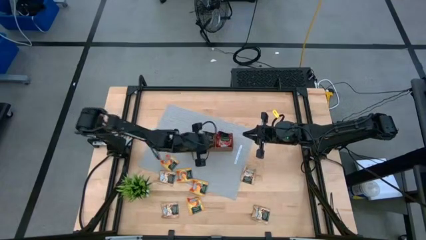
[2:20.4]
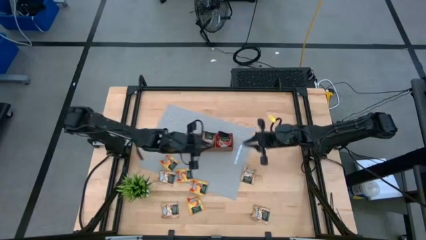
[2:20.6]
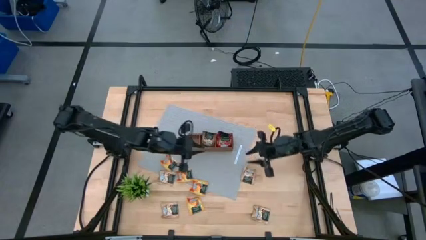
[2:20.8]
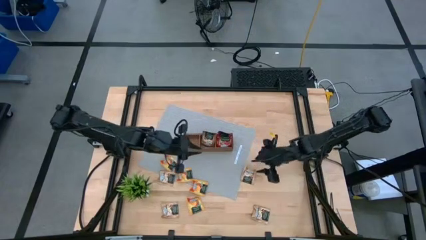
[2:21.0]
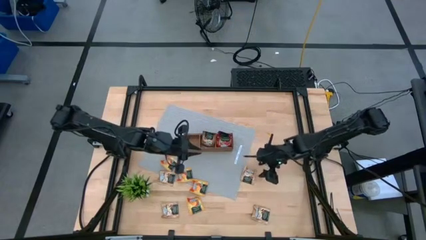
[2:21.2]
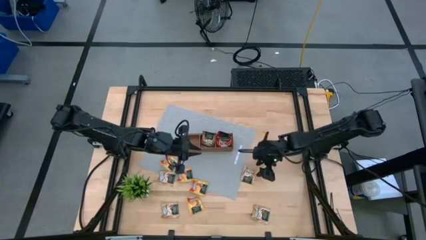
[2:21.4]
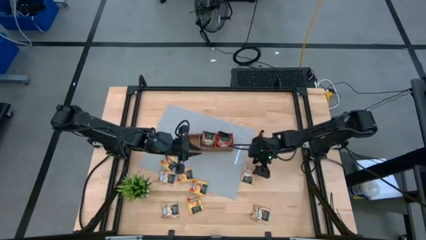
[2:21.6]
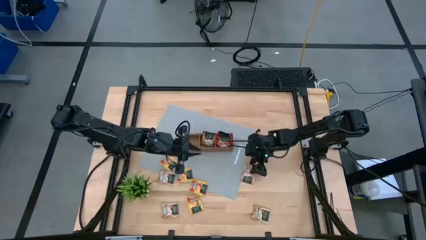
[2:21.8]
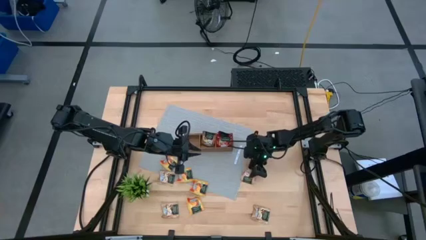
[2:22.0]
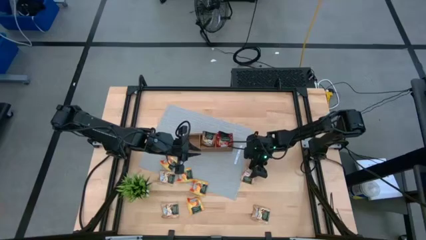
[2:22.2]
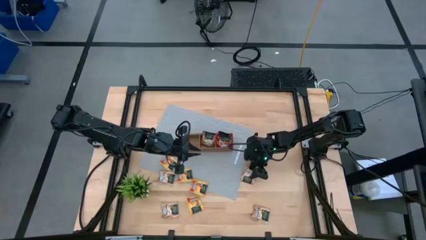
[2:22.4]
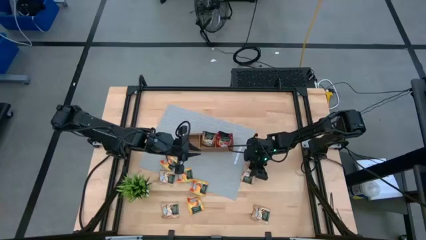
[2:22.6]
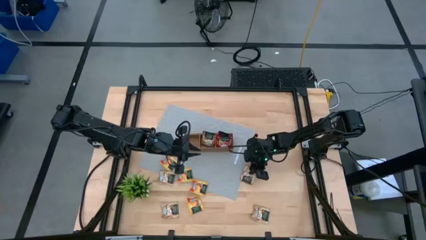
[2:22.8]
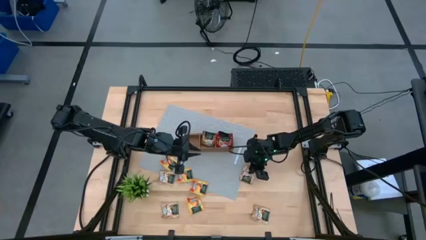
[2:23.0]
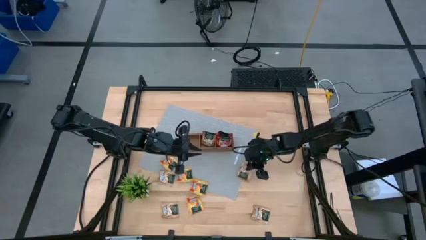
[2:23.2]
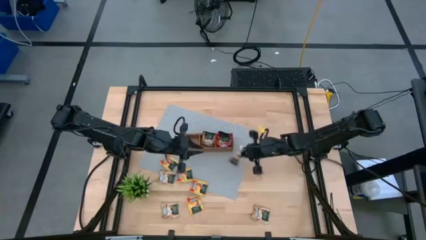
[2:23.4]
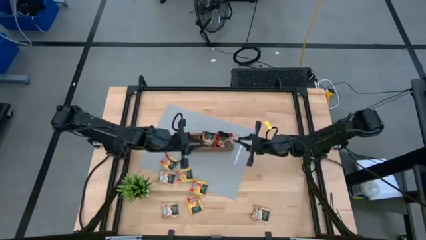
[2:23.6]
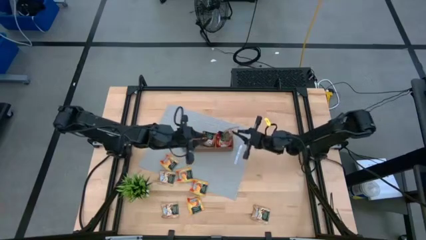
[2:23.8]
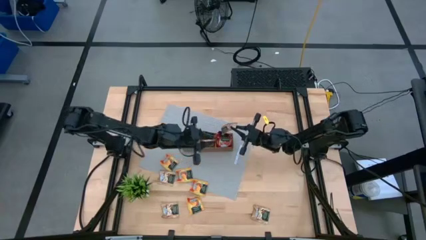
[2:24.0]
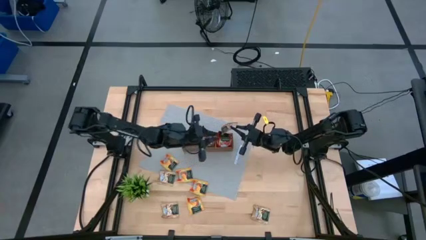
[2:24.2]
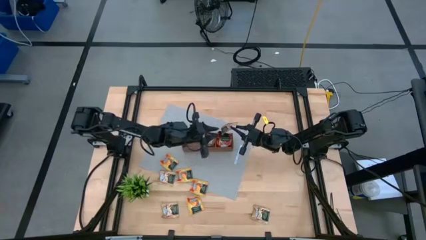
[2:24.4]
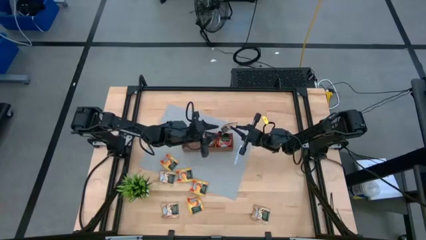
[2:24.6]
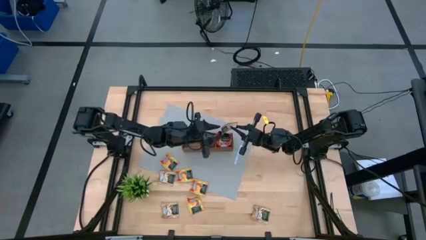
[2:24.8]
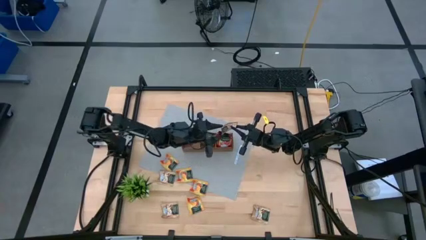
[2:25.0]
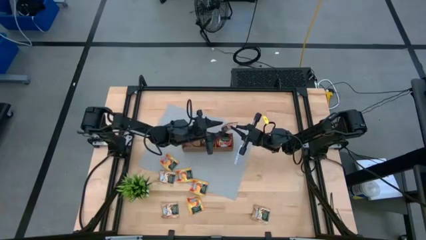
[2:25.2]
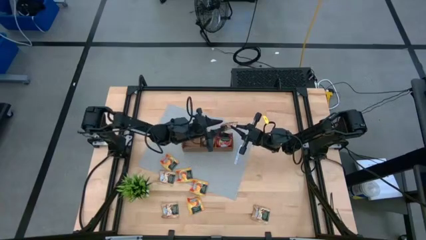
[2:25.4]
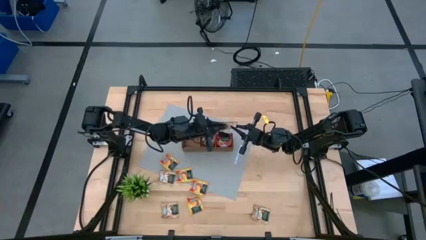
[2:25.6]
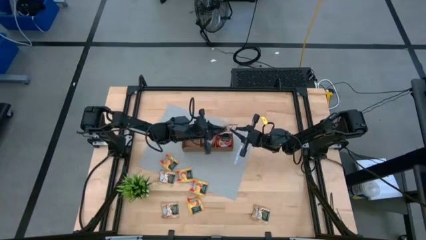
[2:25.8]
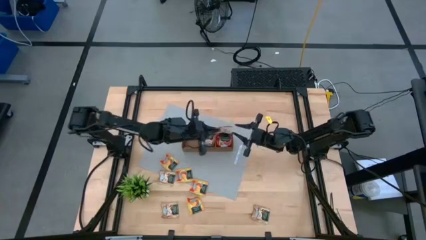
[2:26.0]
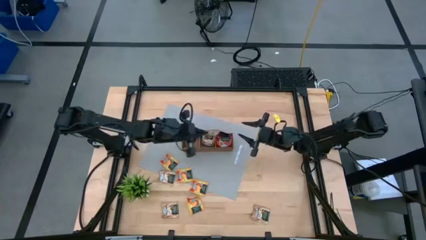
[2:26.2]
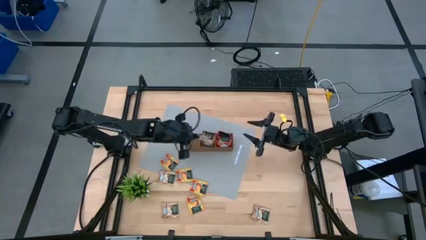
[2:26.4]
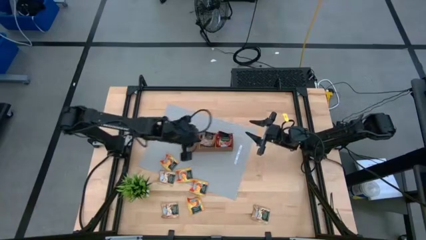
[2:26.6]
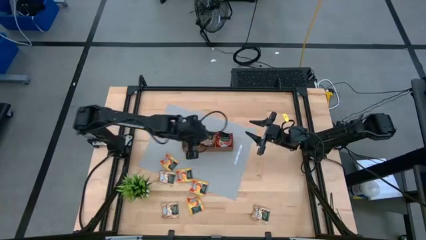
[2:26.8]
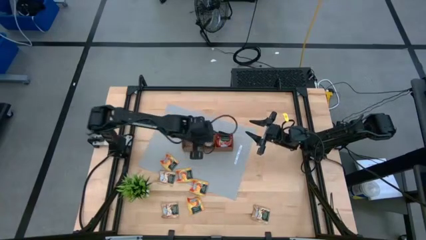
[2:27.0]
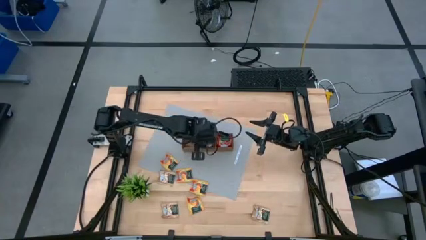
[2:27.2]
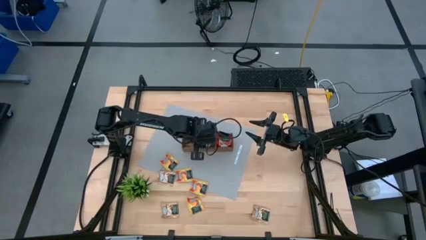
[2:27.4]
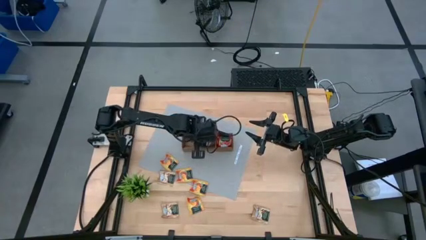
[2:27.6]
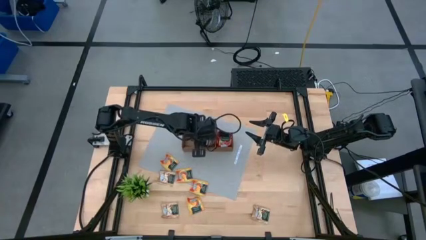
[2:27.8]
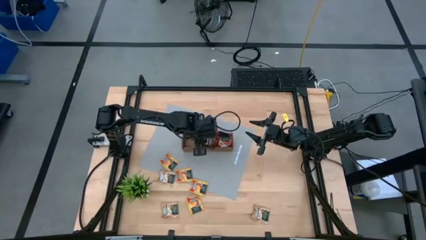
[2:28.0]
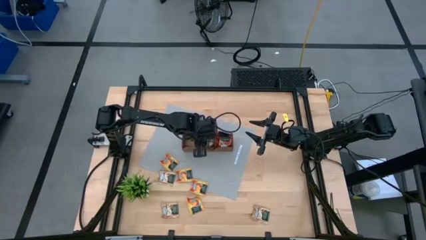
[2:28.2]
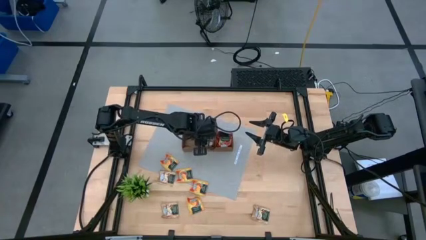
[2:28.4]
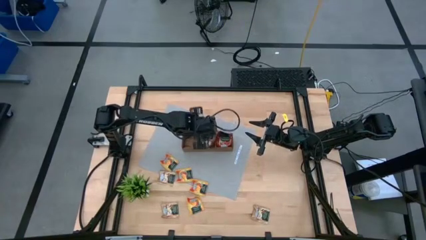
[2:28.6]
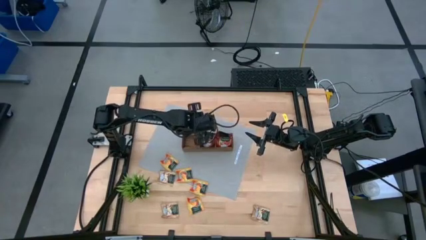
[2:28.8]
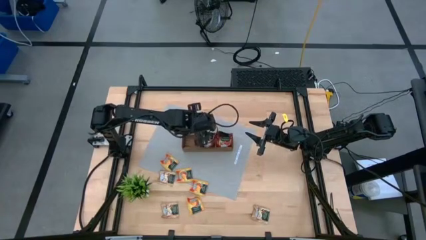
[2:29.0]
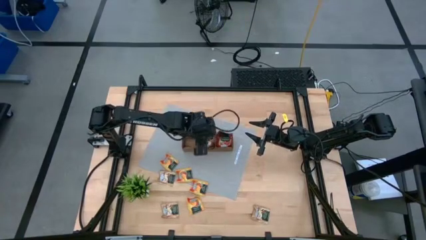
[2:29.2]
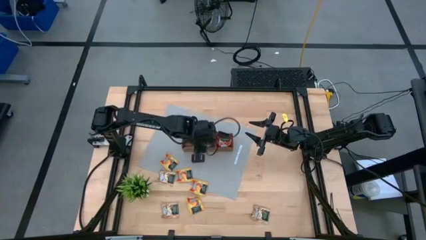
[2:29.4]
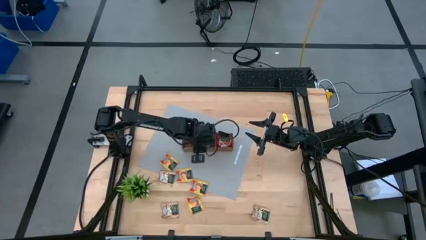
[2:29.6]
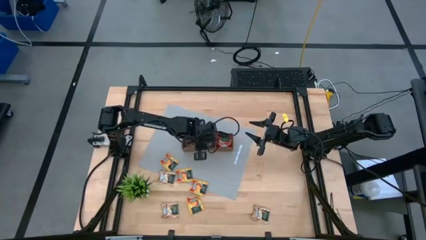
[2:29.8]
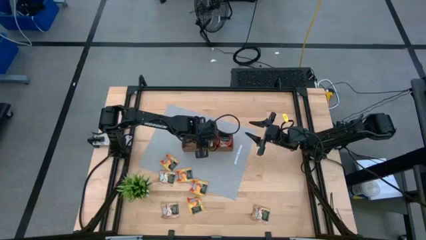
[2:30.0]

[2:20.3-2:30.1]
Task: Pick & Place Tea
Put the brown tea bag into the wooden organizer

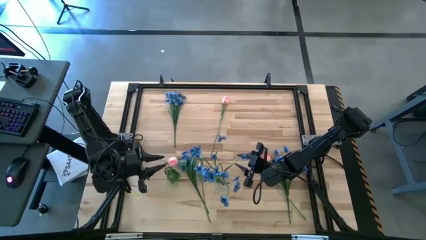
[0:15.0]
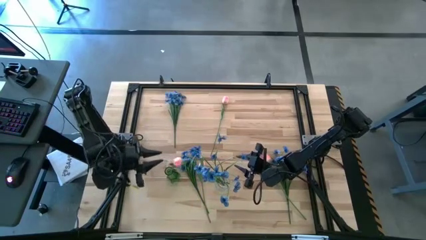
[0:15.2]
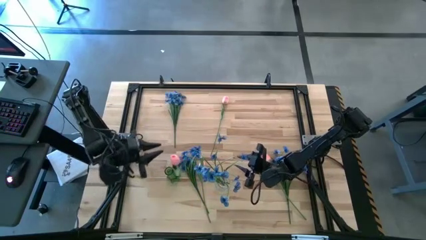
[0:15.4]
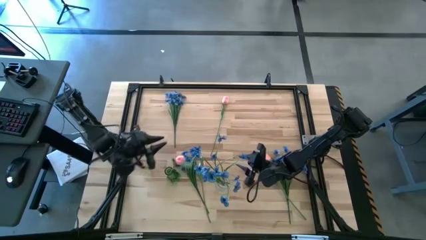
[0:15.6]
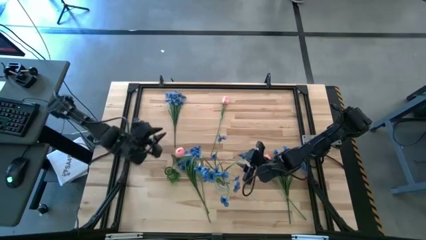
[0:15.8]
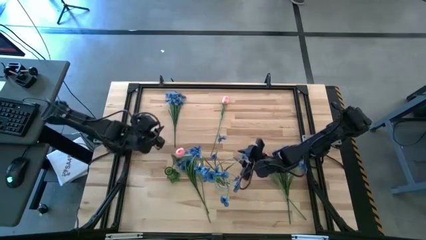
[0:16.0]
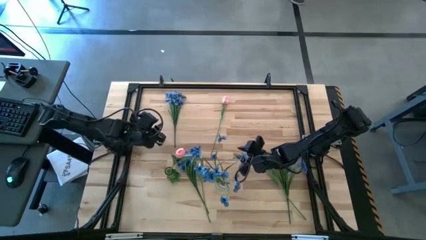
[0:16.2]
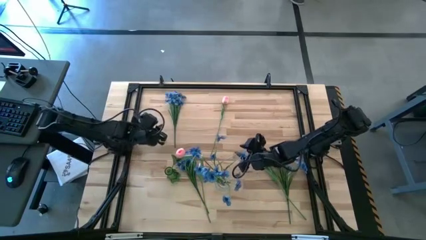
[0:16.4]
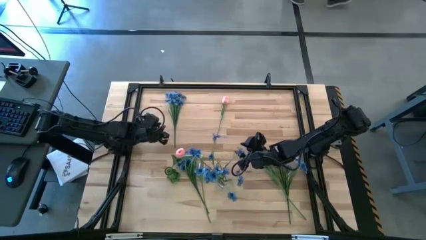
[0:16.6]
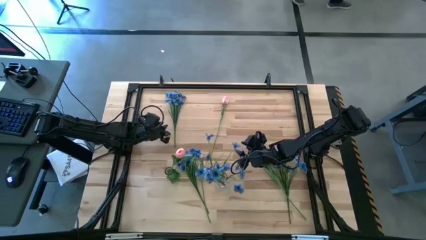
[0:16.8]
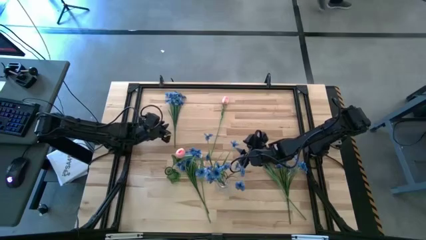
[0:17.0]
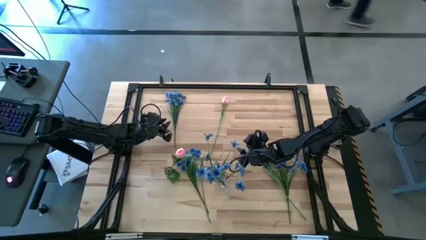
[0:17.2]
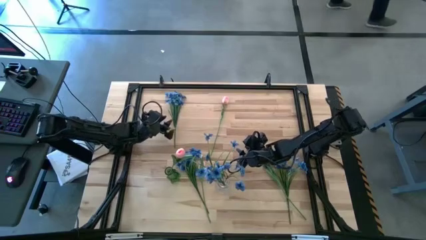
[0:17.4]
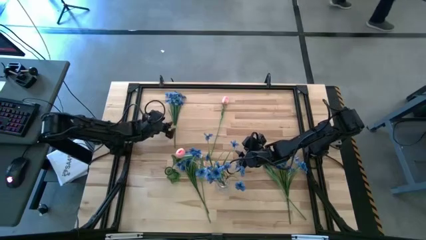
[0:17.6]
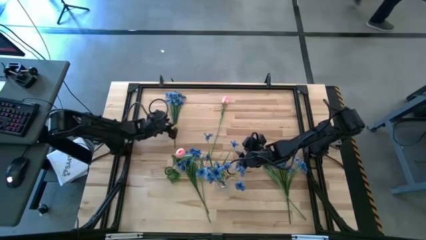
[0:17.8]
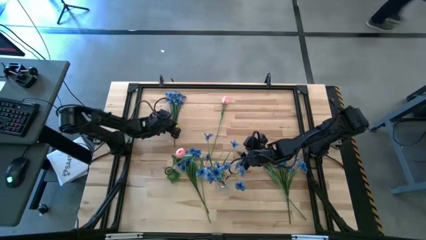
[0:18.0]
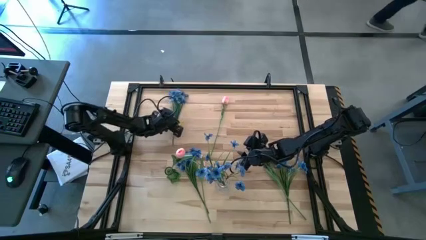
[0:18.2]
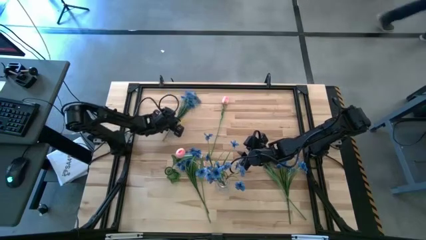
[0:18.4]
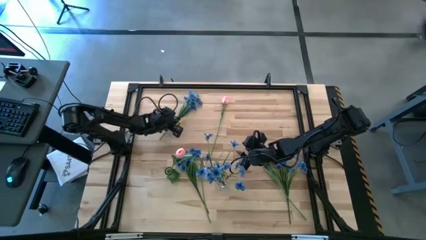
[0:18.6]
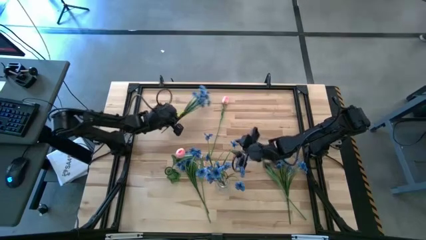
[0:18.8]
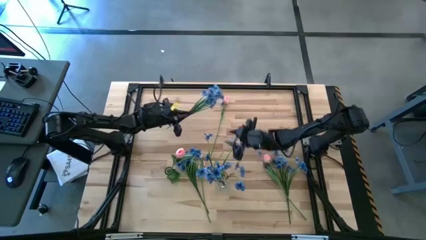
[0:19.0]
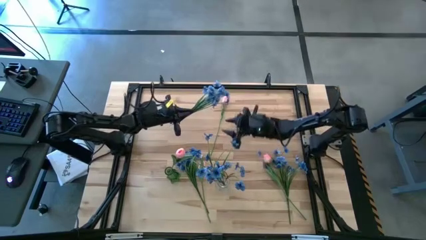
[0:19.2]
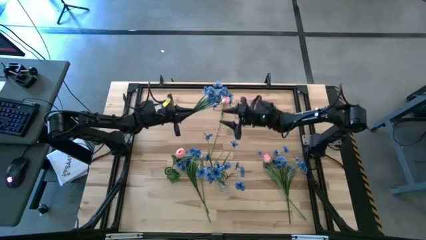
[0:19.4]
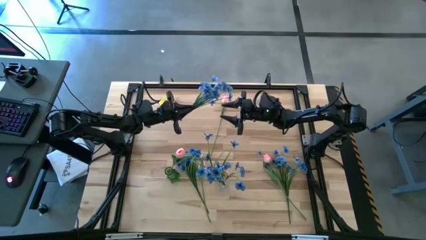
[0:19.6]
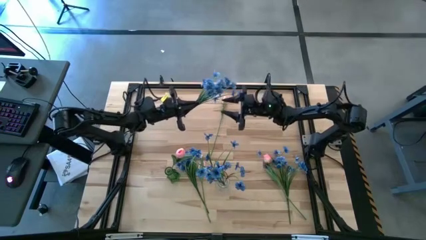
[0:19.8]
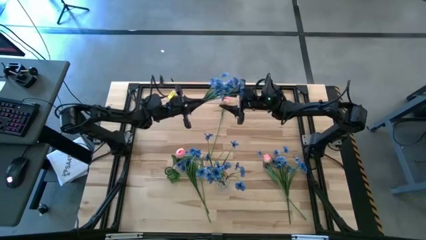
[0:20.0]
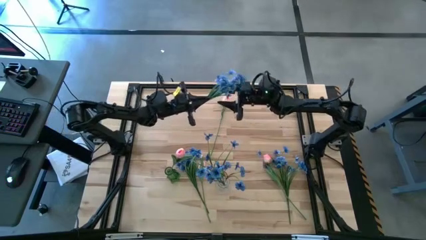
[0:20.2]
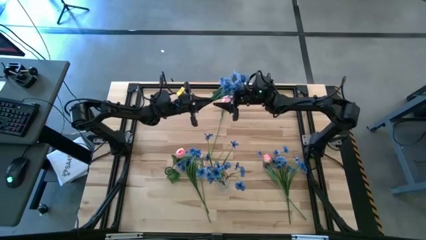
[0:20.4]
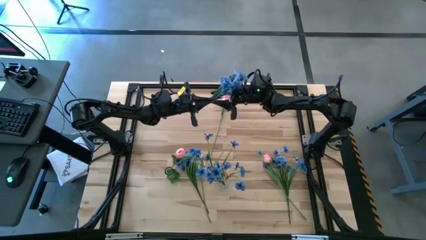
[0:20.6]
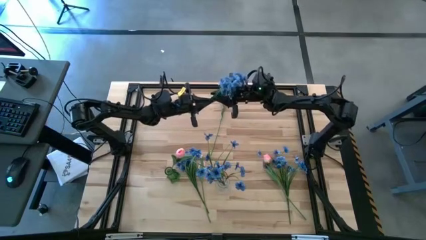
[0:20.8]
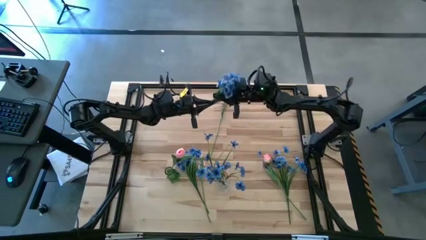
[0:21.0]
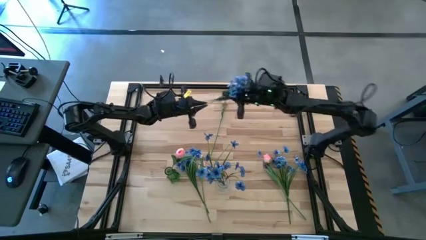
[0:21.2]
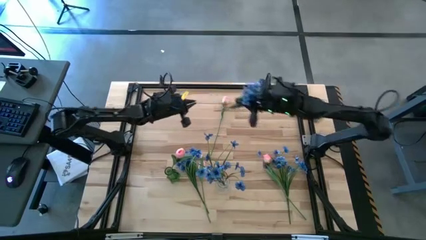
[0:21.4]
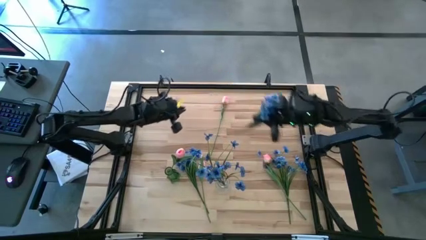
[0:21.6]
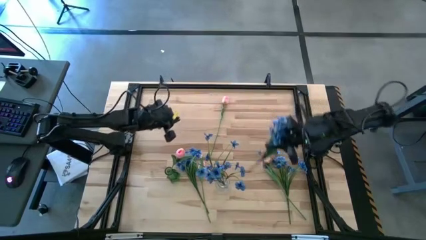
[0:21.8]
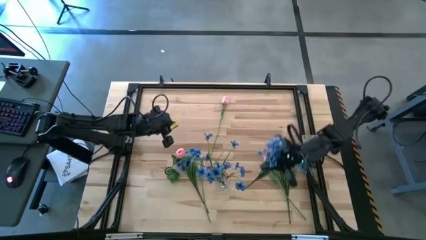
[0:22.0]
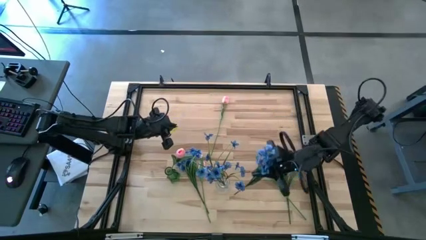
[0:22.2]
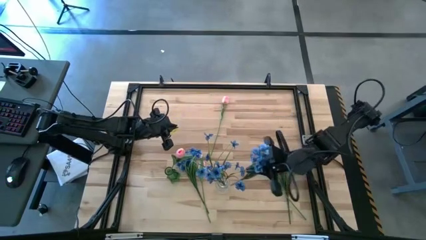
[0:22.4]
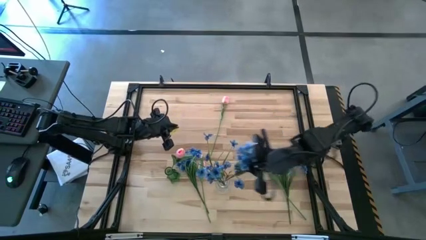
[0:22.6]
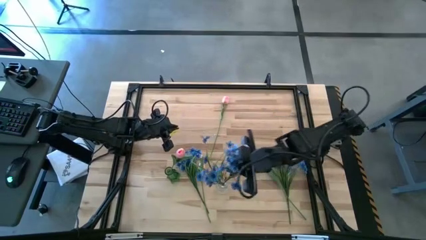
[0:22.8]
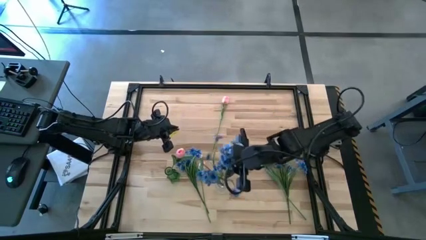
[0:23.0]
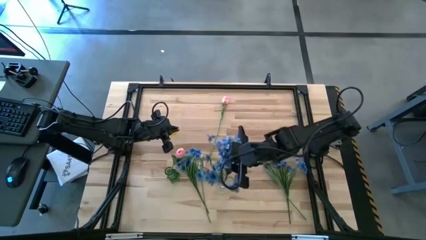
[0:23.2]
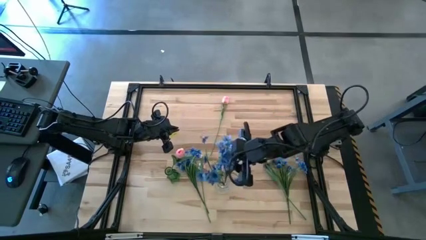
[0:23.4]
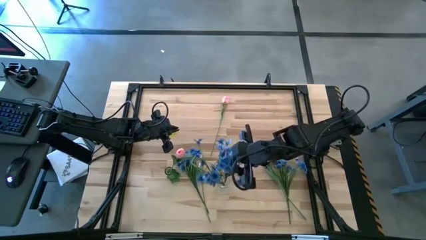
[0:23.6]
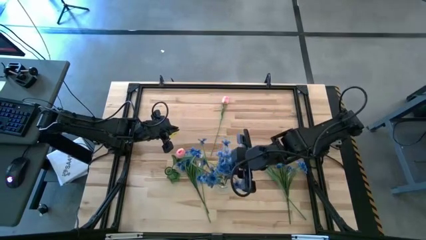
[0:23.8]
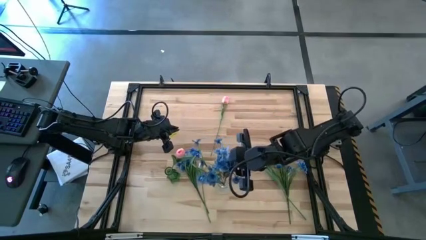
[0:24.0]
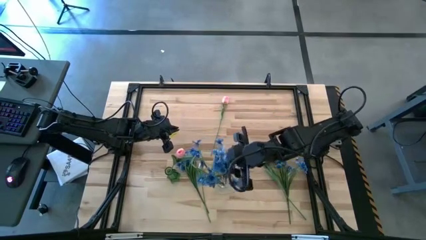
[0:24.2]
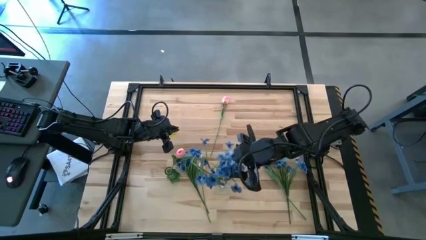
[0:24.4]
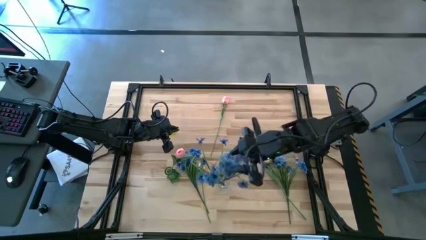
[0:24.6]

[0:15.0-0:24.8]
Task: Sort flowers into vase by color
Put the top left blue flower into the transparent vase
